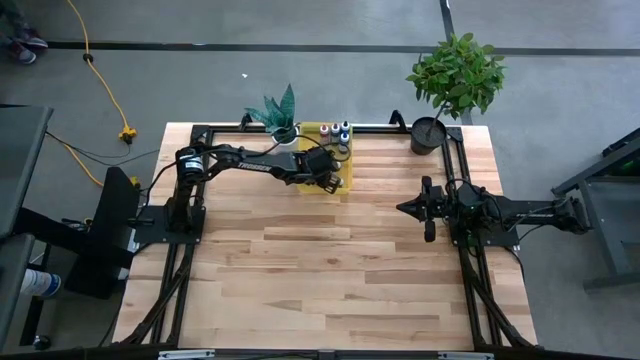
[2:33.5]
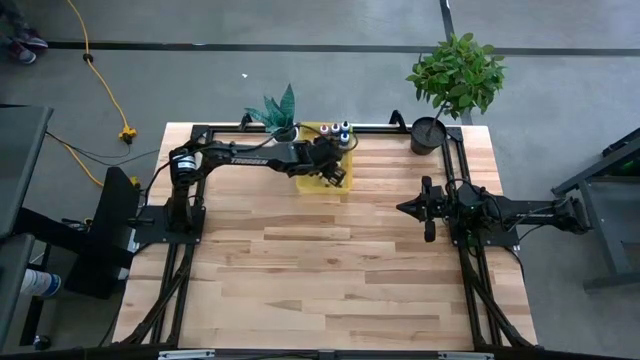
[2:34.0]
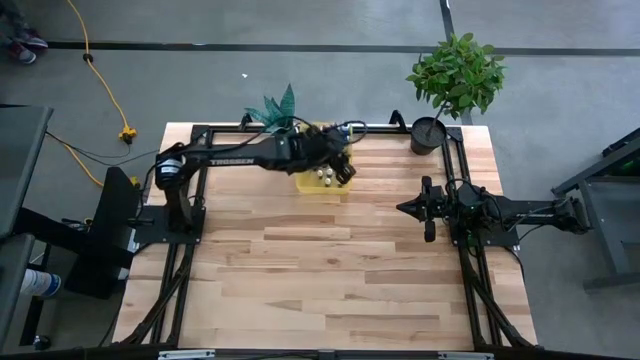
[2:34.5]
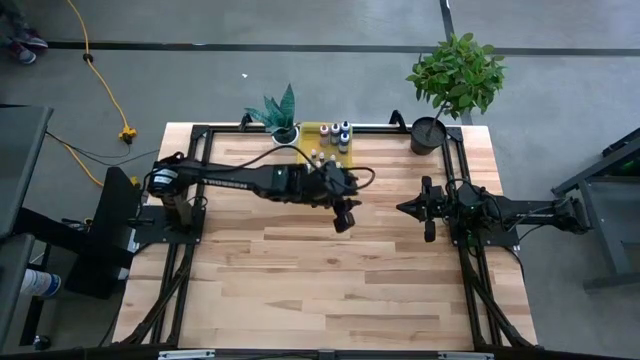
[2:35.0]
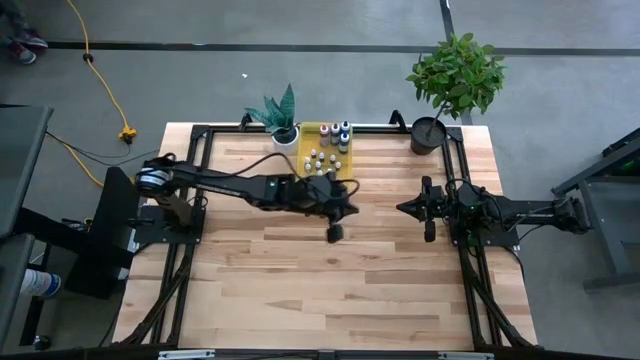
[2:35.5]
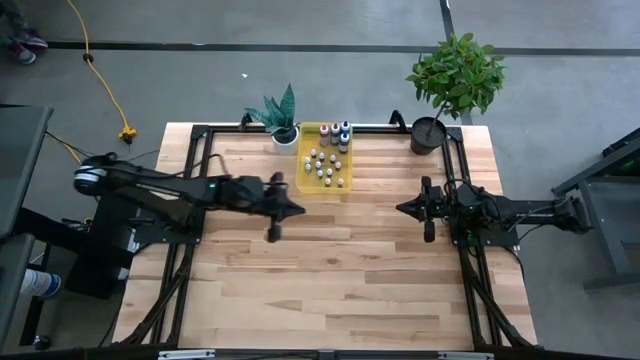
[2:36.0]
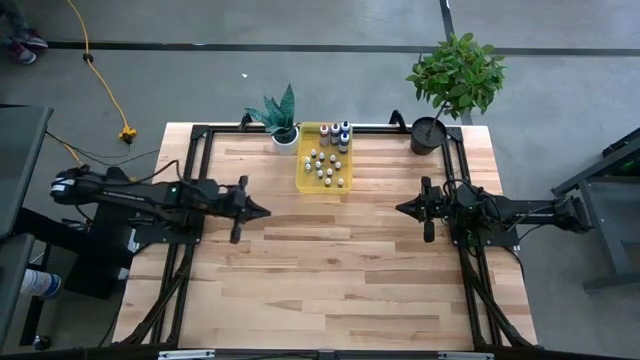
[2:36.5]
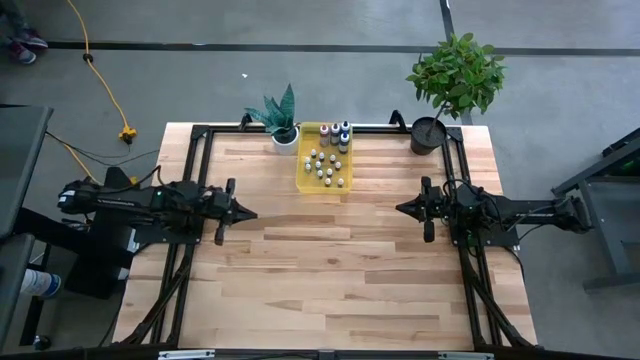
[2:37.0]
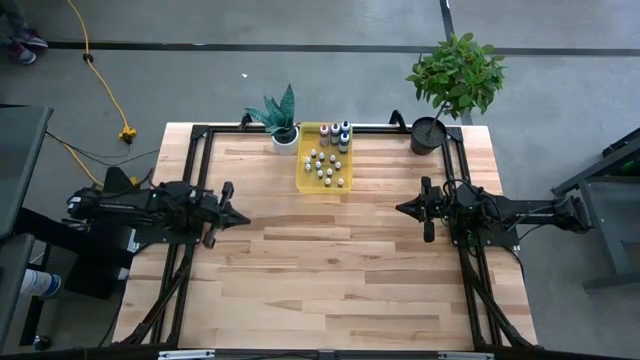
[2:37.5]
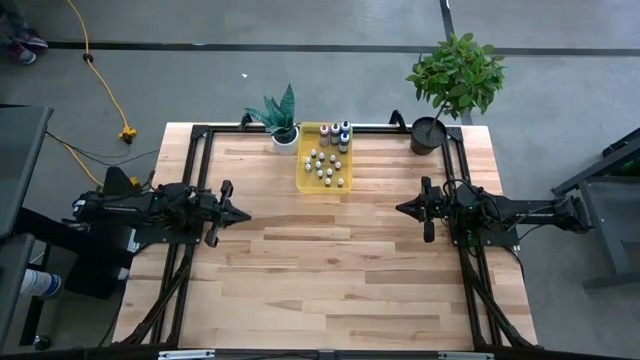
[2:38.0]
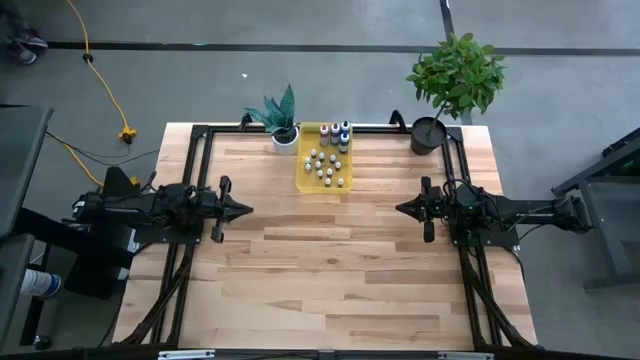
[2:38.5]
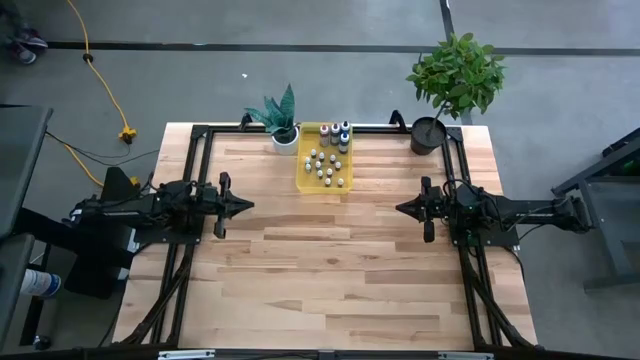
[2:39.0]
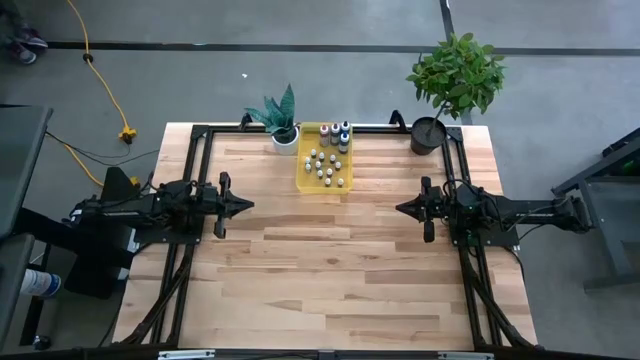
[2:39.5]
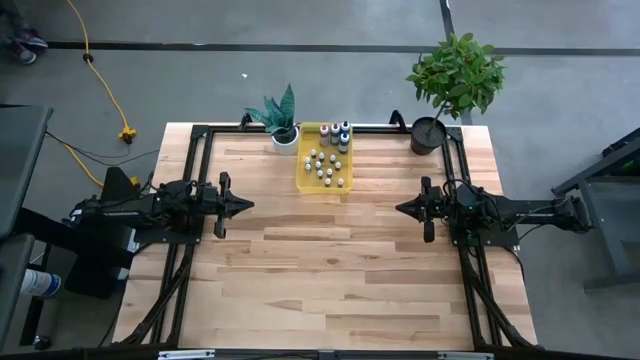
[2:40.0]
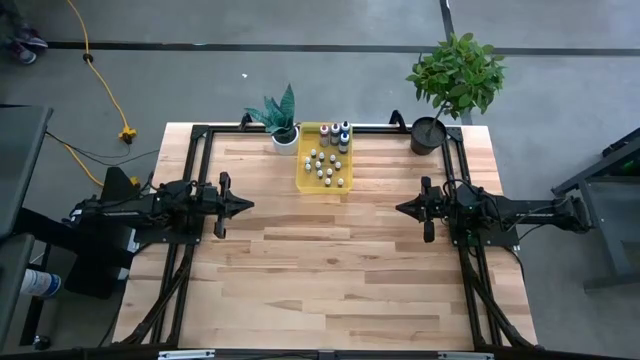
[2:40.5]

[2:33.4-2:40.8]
Task: Pick & Place food coloring
Return to Home Position

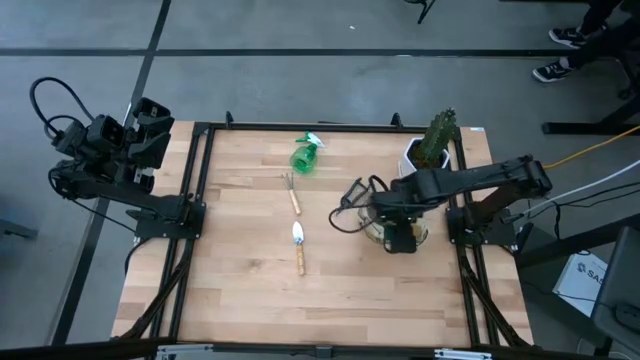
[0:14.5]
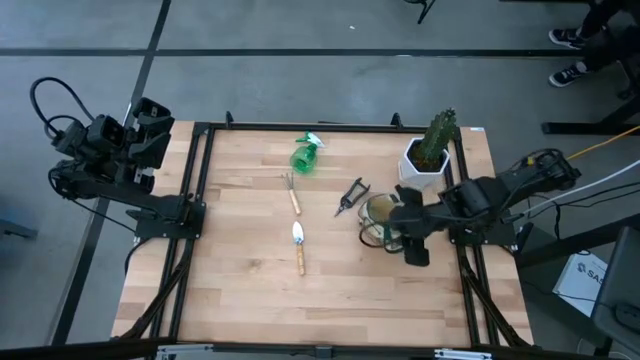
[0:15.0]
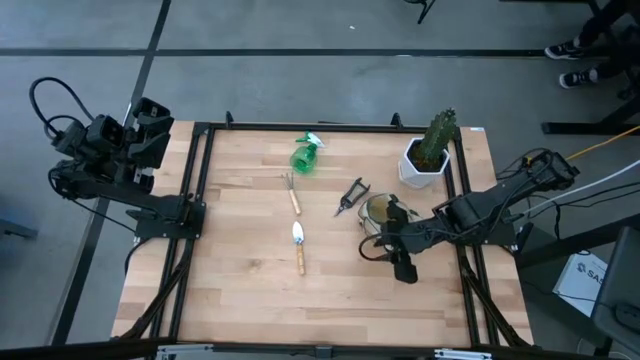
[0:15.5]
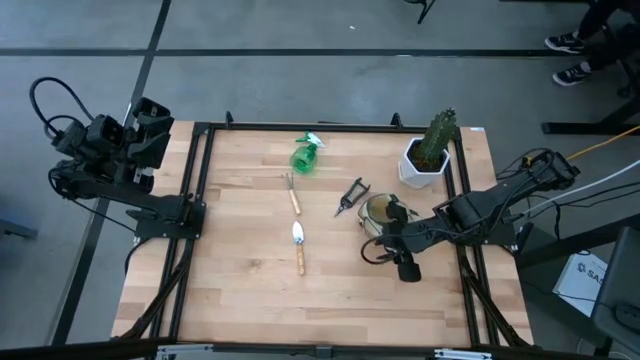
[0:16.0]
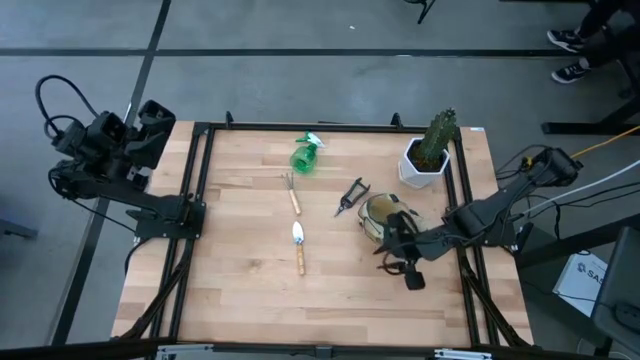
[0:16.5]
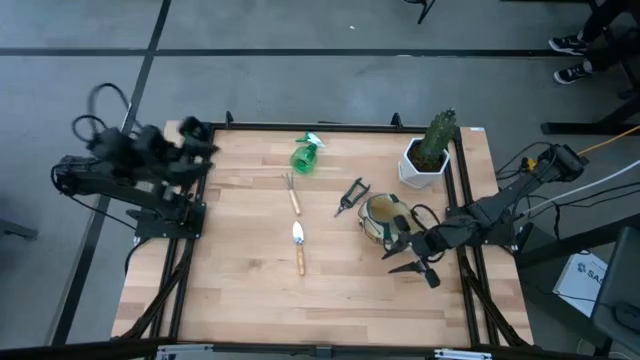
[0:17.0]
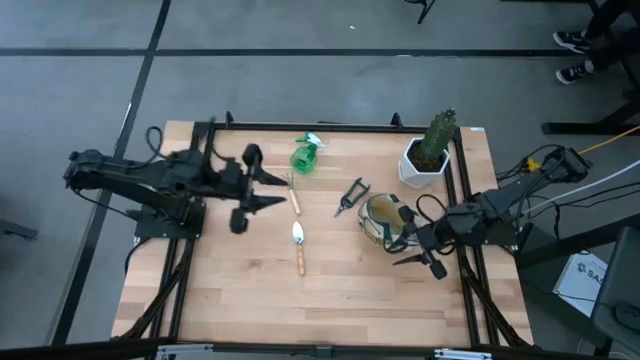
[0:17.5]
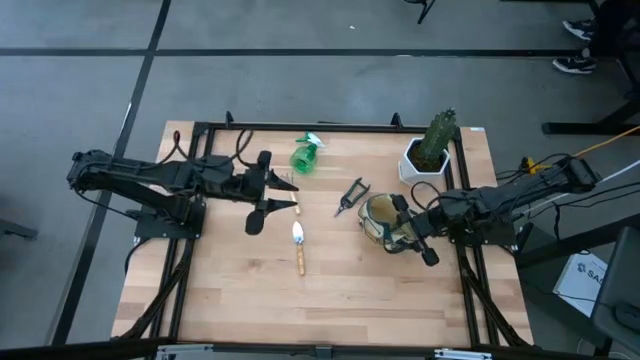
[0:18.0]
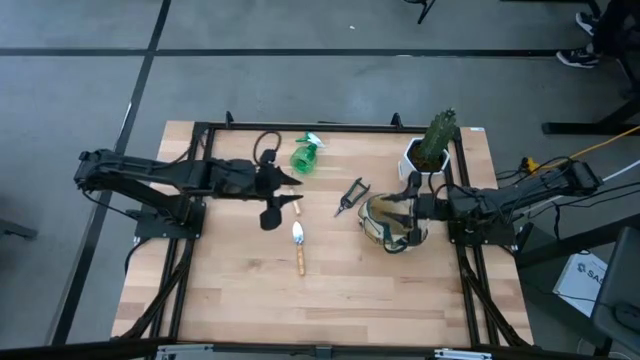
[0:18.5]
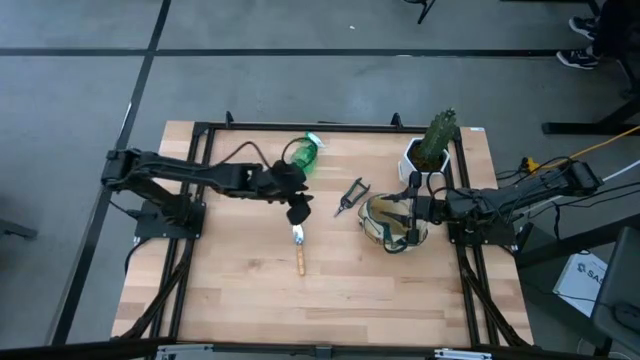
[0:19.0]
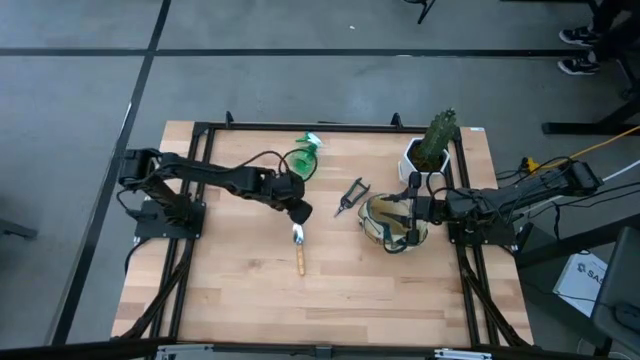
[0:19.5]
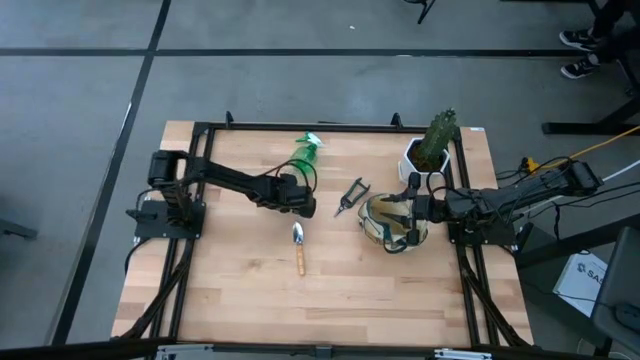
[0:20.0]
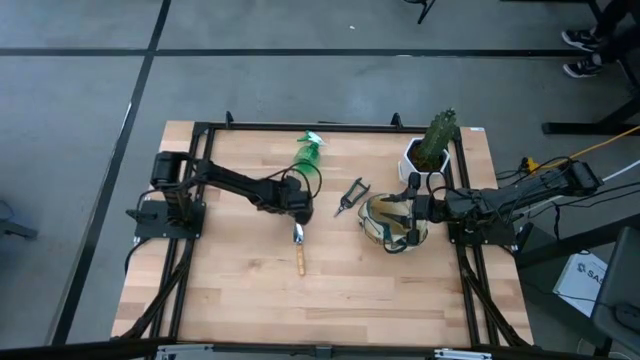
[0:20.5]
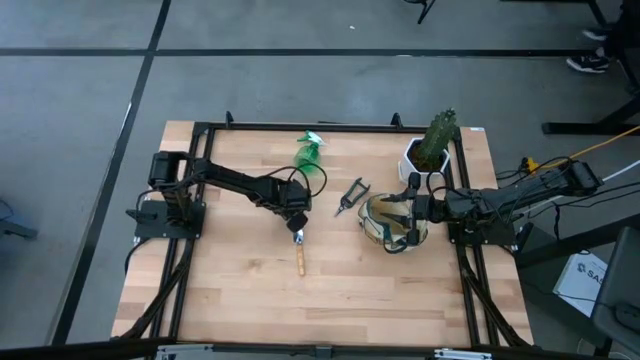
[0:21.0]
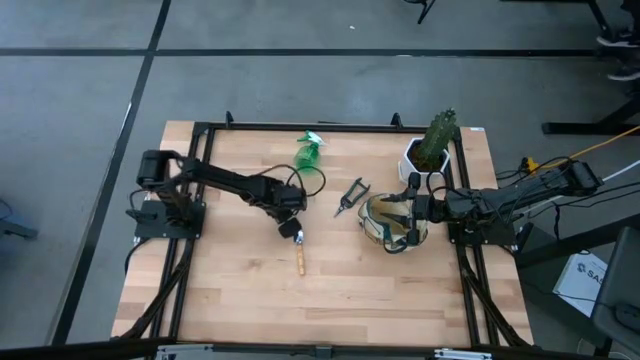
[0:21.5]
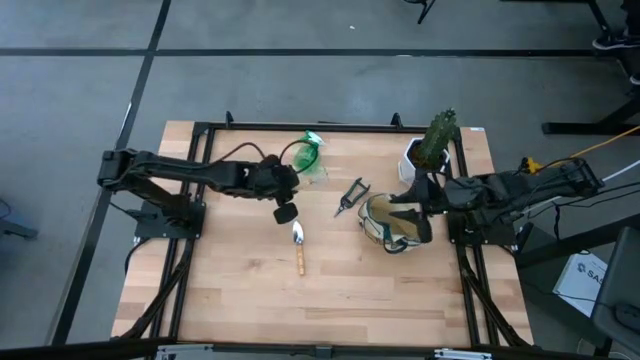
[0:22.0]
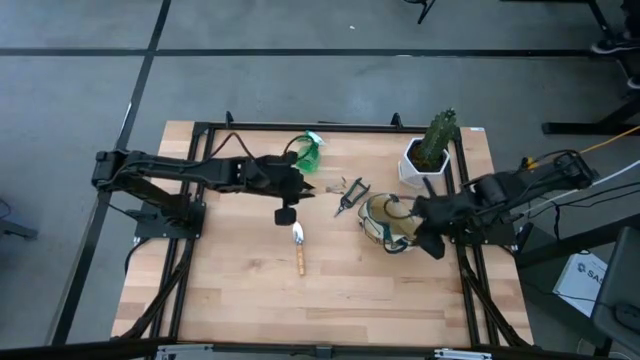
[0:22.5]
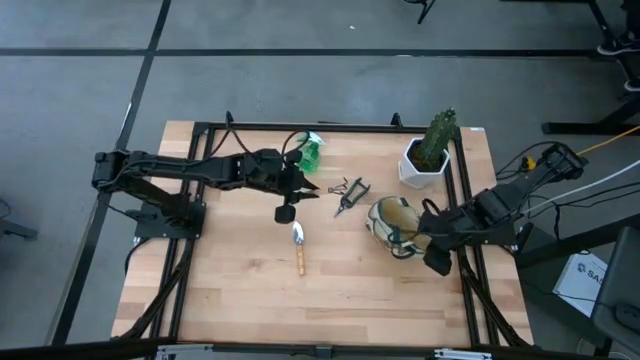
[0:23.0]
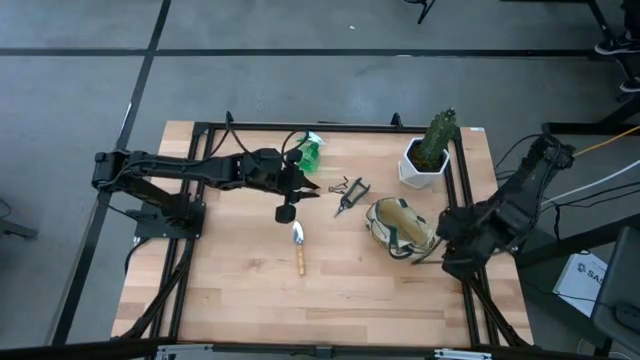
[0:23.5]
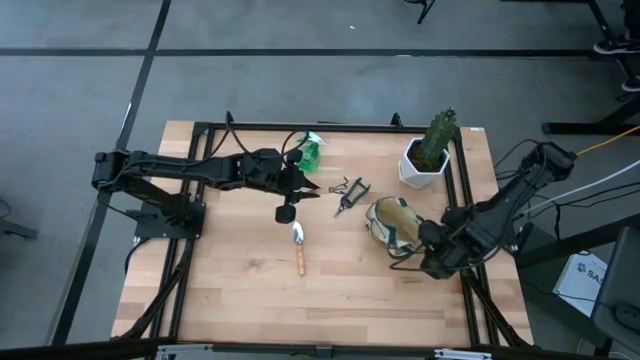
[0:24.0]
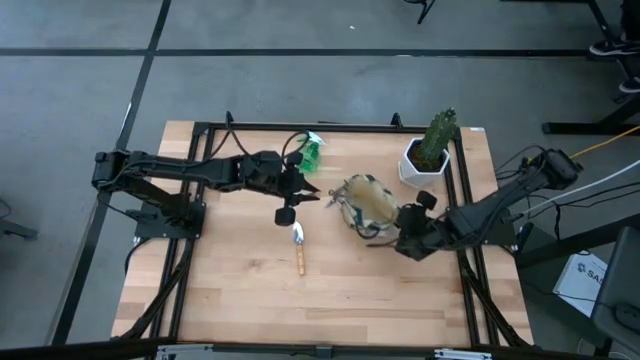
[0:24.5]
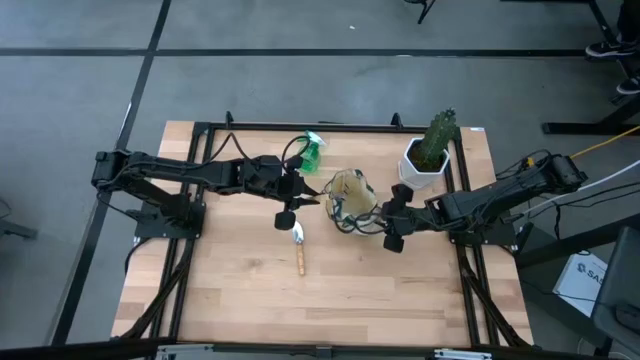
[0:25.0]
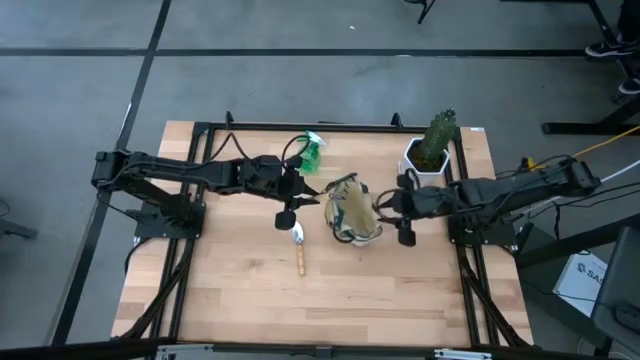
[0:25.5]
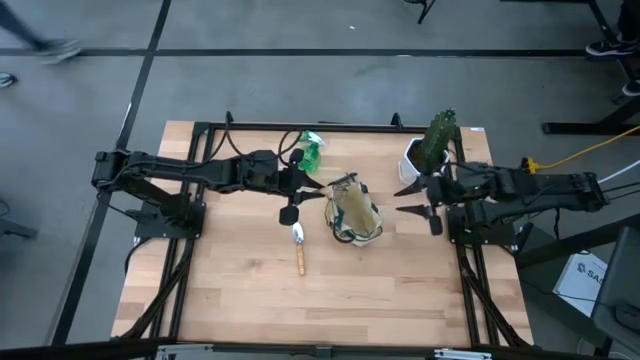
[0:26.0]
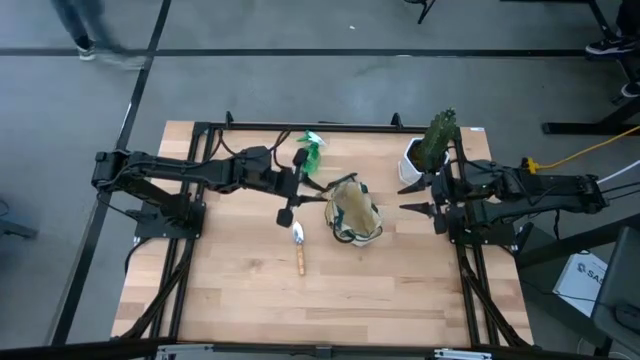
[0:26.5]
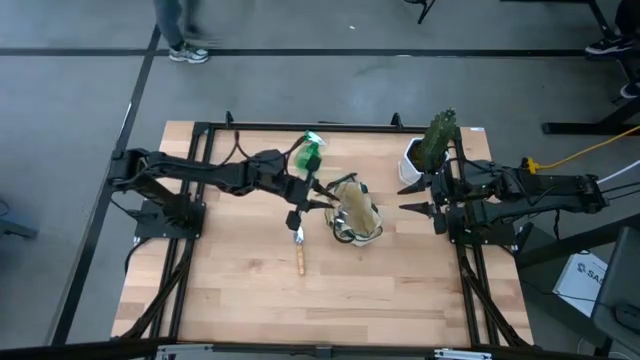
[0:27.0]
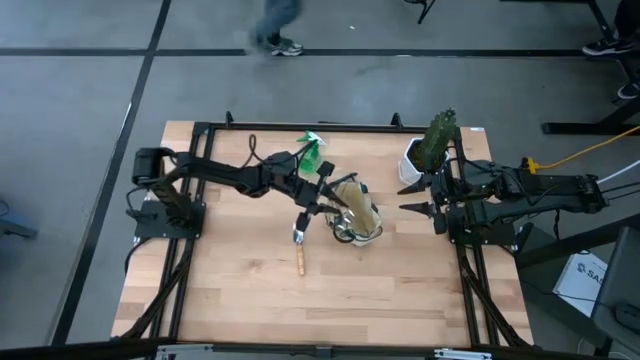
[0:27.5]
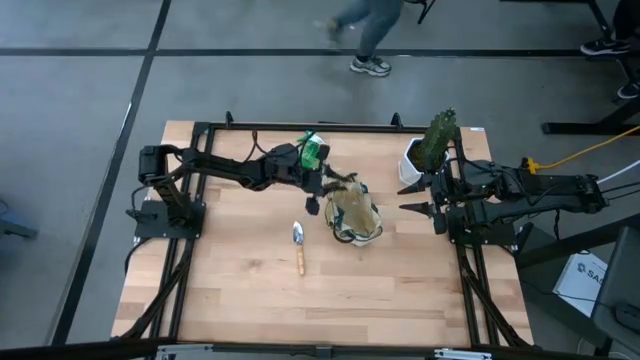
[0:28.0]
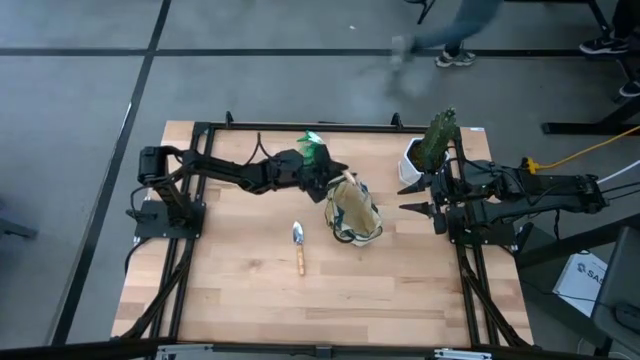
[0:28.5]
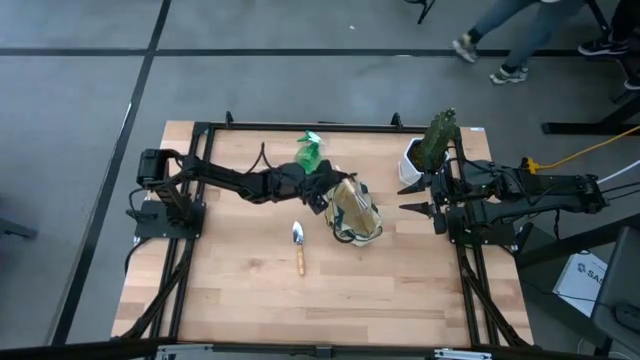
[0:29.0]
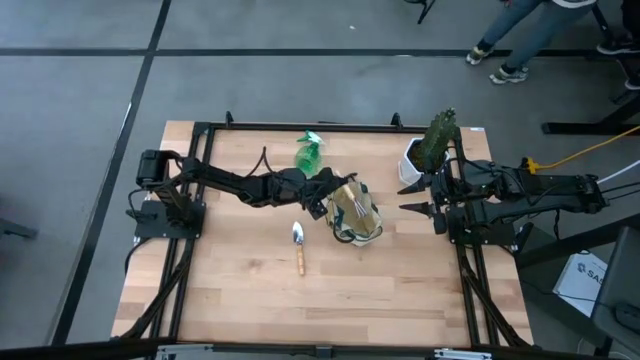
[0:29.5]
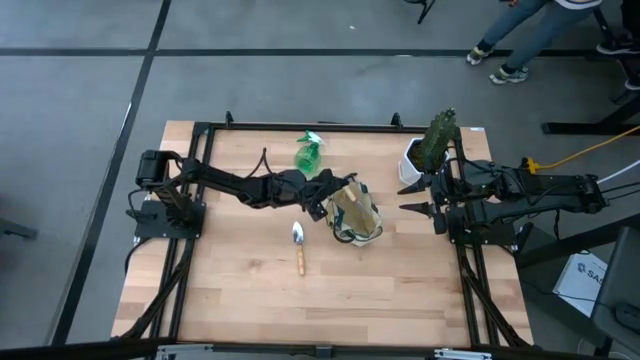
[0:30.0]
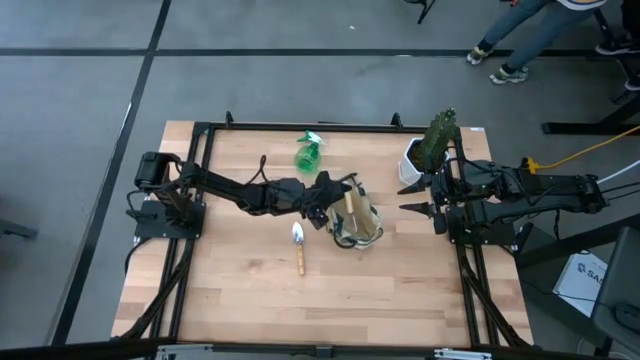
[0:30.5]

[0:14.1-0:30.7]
Task: Pick & Place Garden tools in Gardening bag
Put the brown hand rake into the light brown gardening bag
